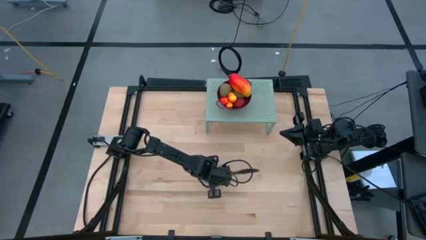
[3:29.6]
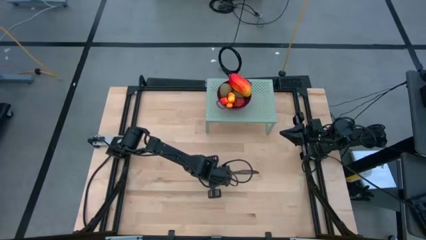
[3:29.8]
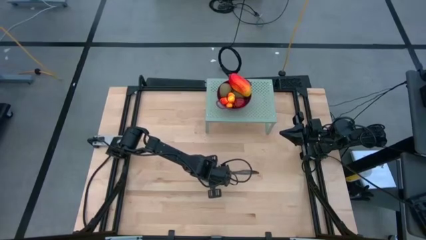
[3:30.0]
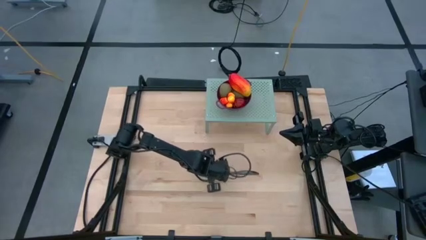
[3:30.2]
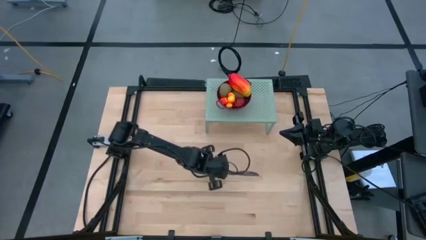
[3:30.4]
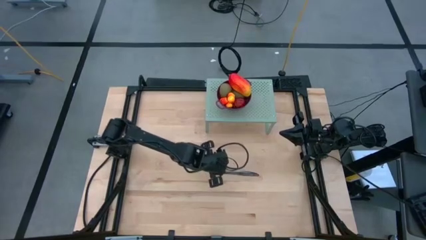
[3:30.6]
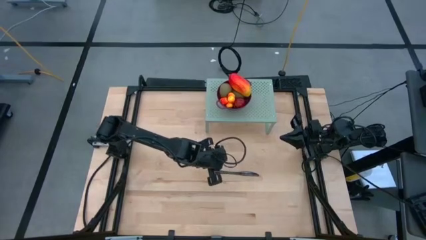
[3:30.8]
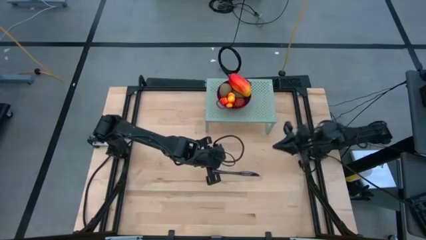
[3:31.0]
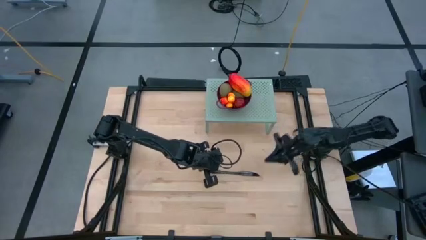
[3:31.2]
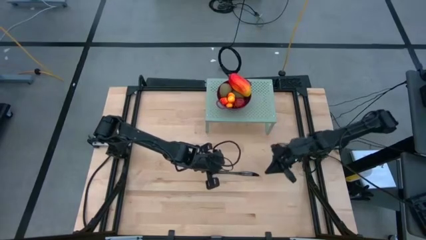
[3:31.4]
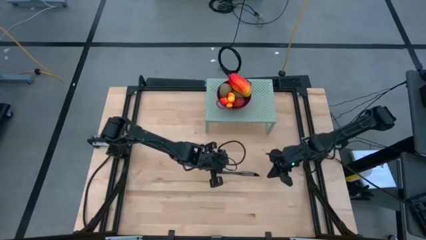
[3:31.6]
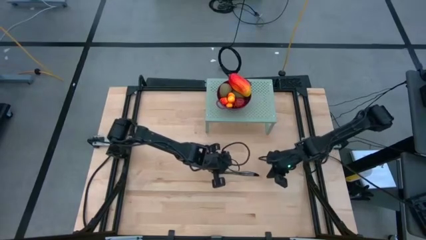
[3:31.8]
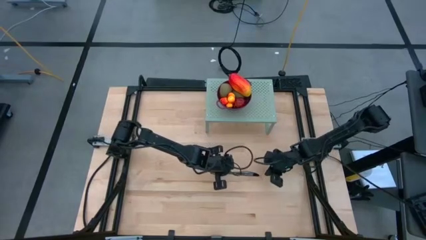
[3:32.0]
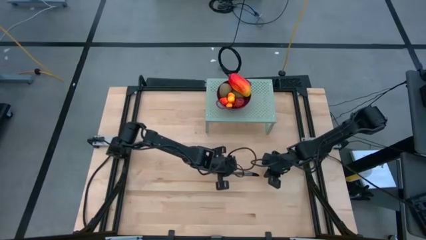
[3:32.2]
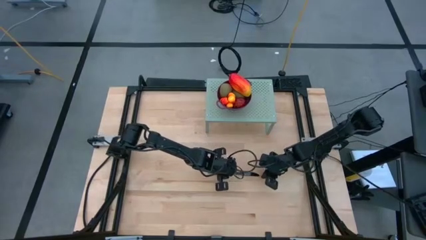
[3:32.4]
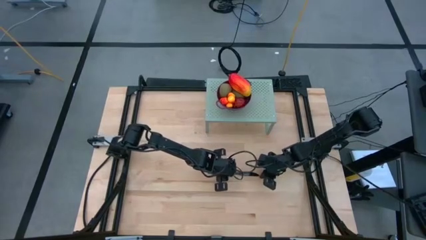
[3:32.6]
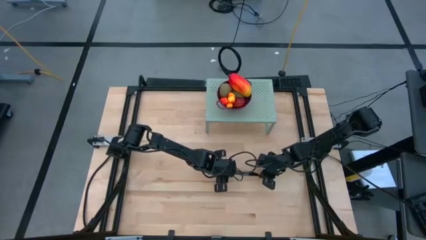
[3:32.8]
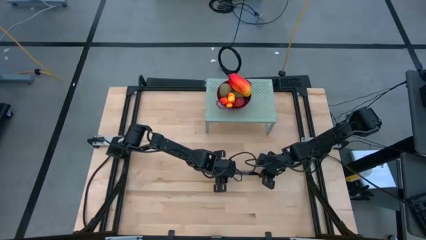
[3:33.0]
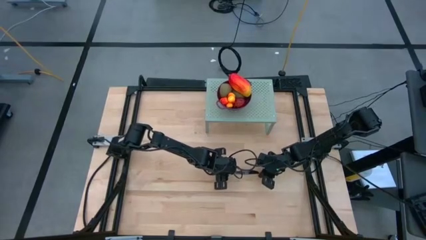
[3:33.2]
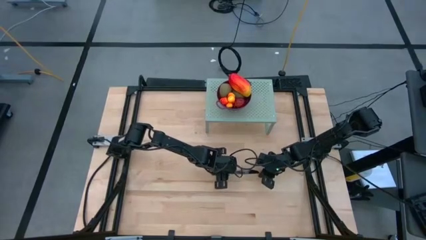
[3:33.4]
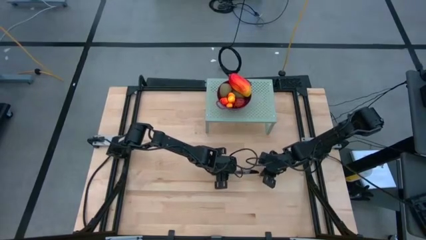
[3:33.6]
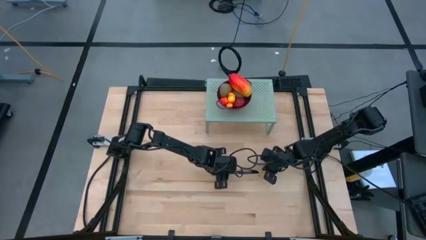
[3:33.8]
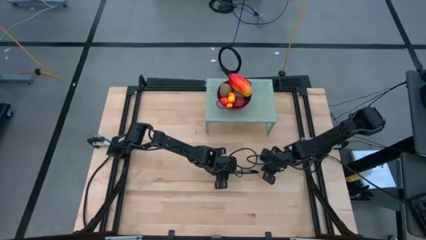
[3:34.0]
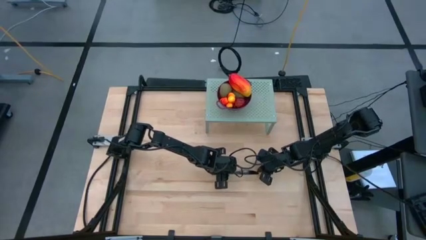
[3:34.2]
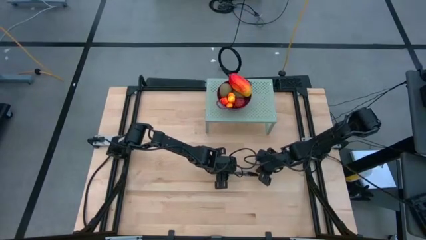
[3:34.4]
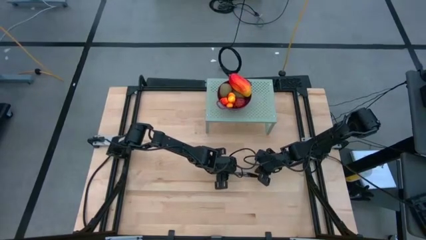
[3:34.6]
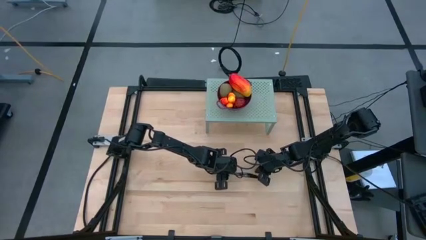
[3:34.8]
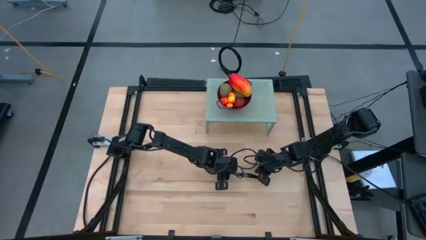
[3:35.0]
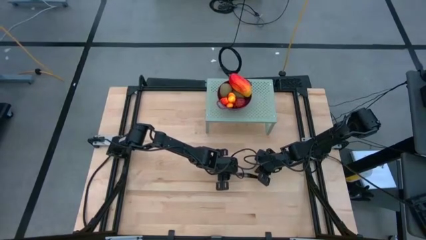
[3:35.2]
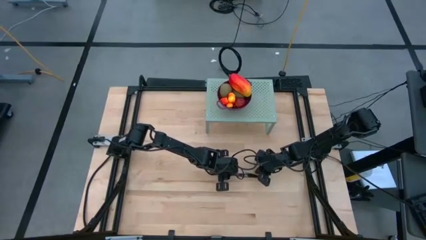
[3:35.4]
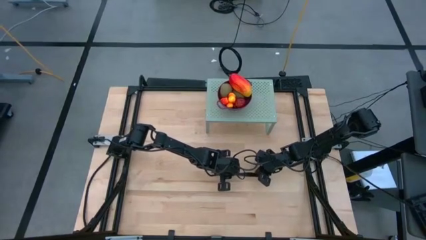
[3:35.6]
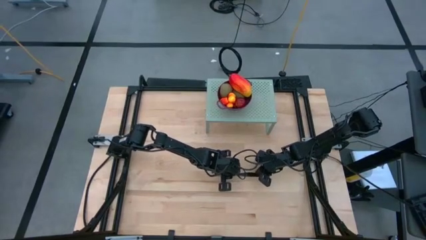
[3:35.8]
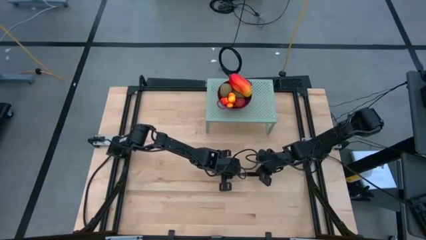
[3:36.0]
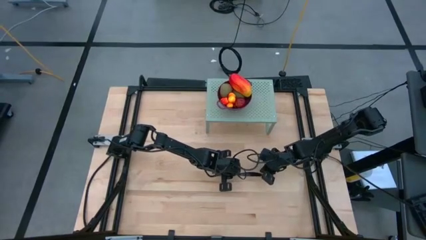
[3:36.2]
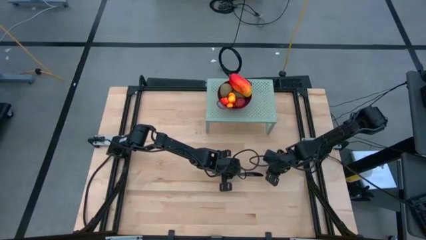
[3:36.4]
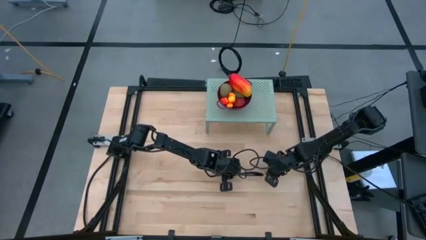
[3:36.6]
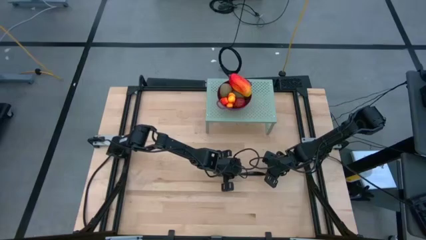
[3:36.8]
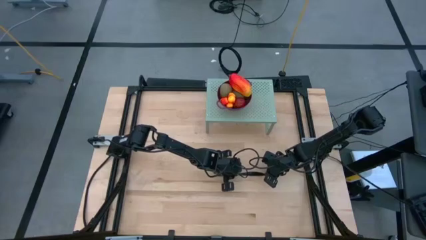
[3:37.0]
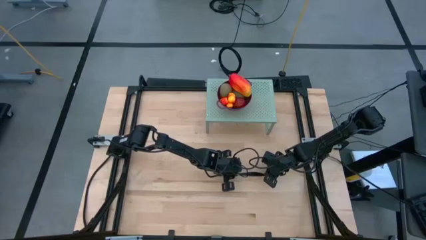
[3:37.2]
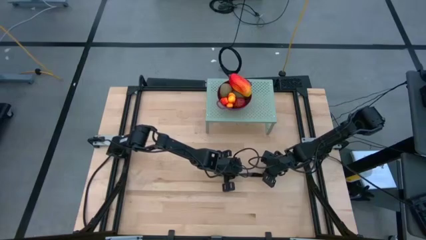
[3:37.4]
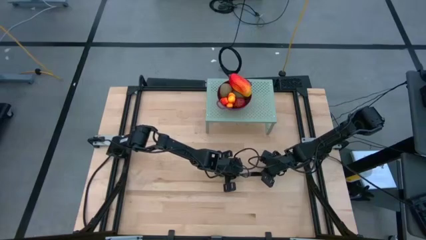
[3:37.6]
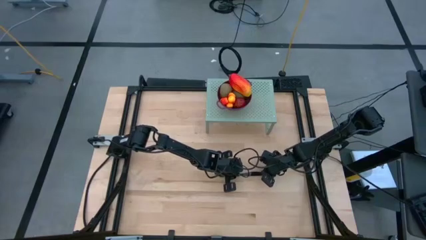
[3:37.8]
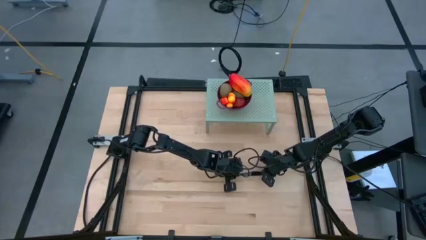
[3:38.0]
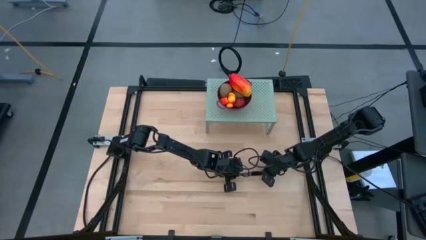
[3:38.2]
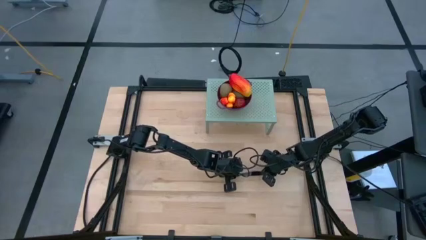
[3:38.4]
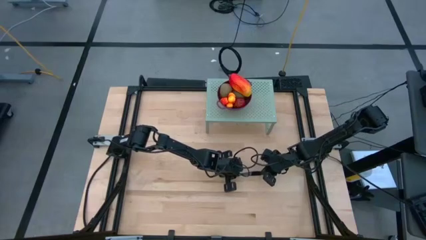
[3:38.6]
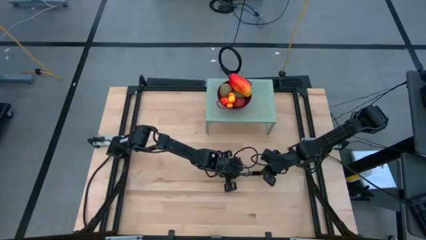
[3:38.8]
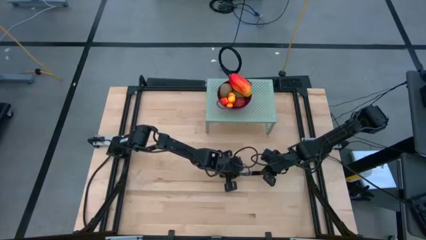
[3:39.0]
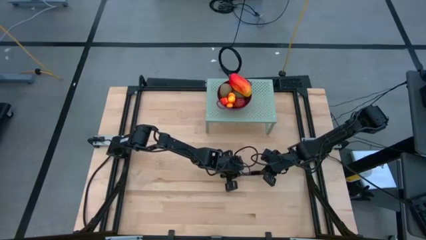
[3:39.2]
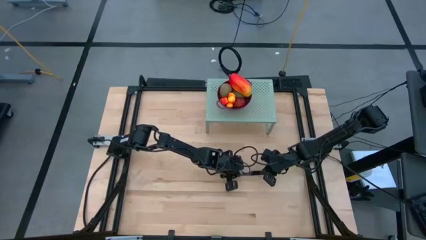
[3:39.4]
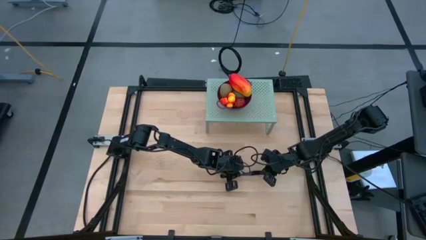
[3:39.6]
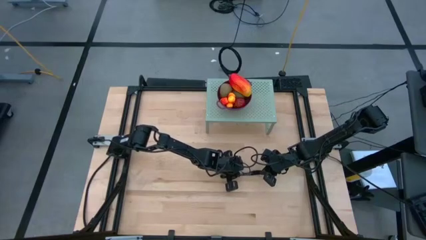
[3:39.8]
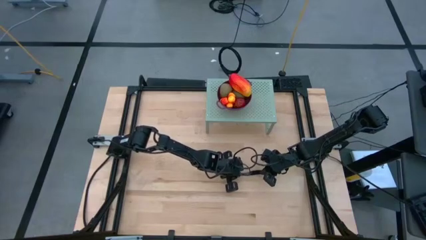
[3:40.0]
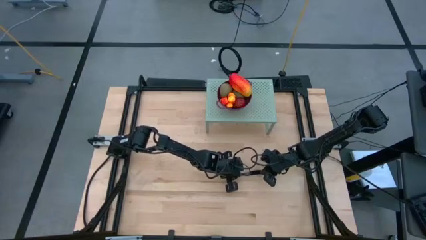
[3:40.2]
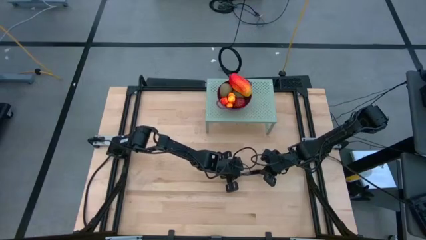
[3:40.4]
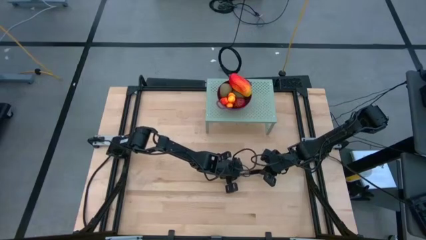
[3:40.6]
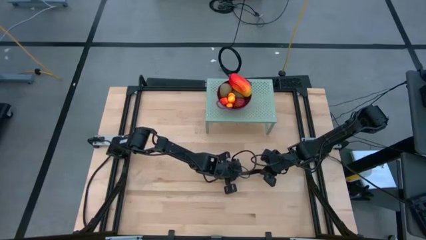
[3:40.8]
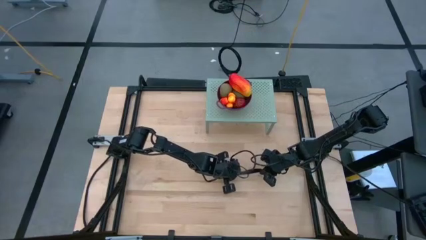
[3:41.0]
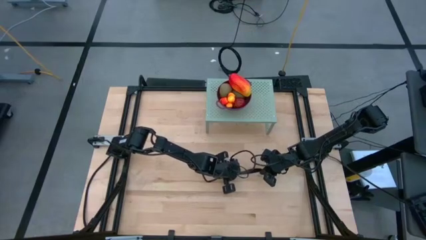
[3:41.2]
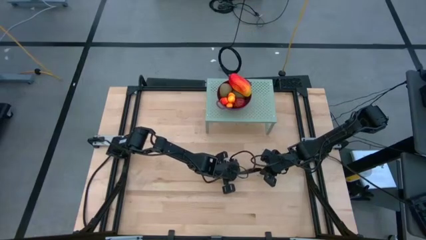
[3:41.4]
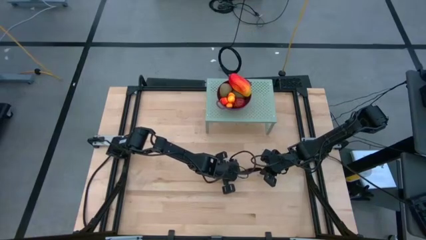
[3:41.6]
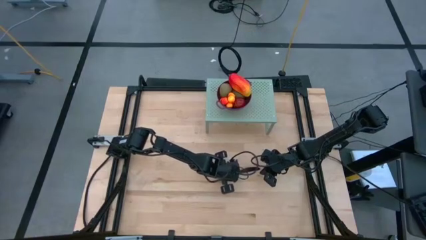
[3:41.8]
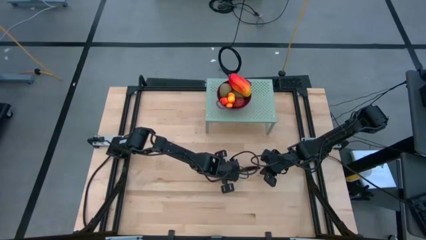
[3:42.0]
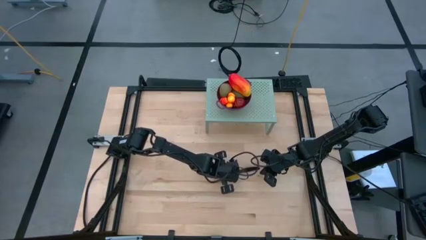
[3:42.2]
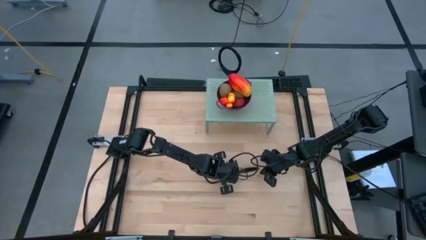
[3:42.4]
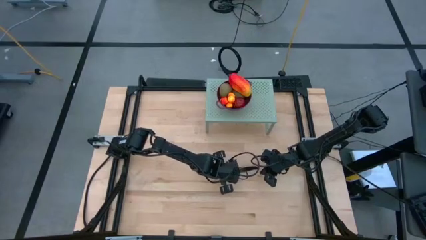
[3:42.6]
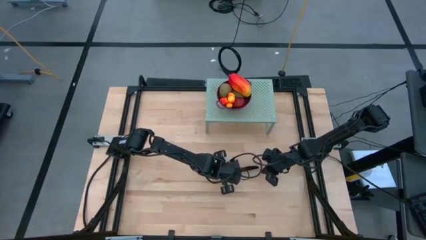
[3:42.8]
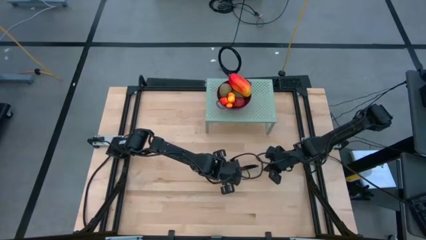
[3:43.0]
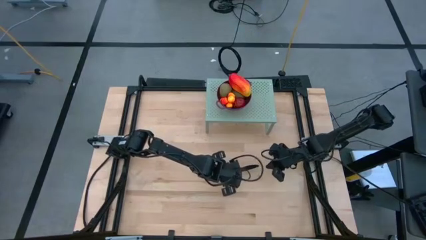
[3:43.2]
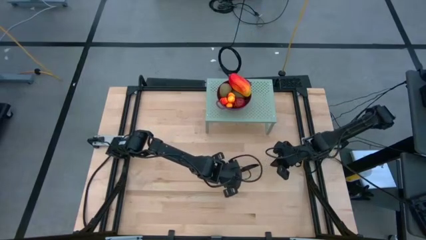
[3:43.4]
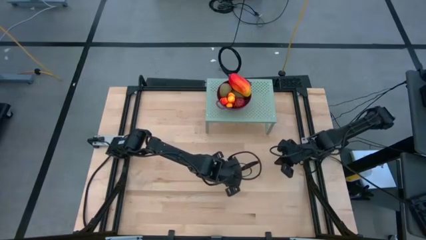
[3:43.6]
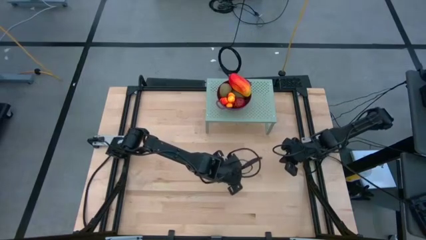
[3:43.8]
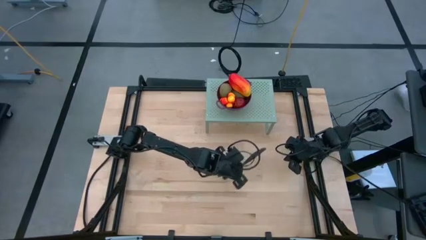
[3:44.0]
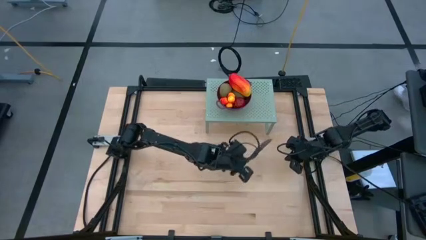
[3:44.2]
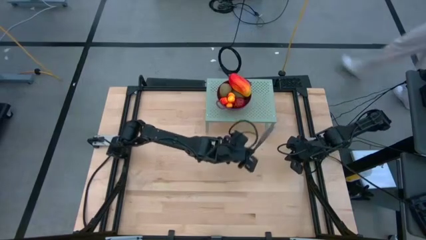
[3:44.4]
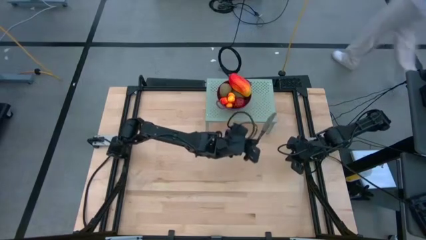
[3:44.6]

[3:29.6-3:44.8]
Task: Pick & Place Fruit
Put the knife on the shelf

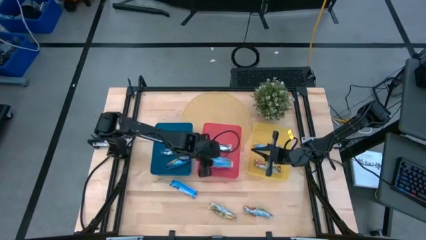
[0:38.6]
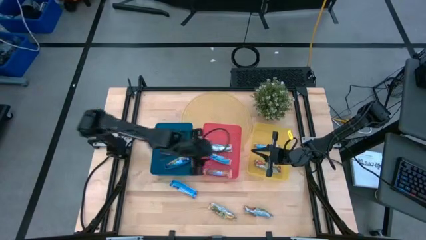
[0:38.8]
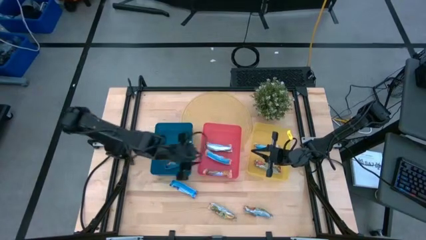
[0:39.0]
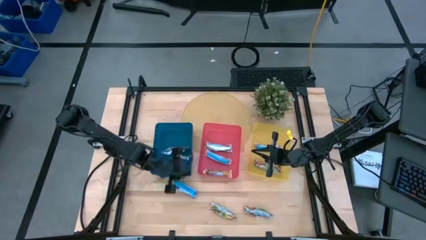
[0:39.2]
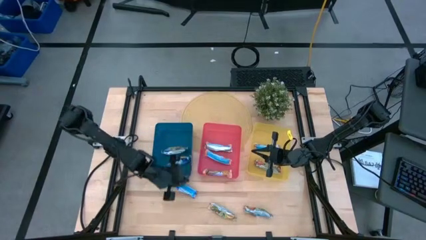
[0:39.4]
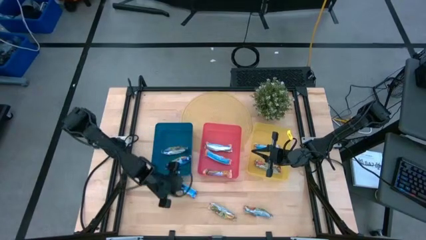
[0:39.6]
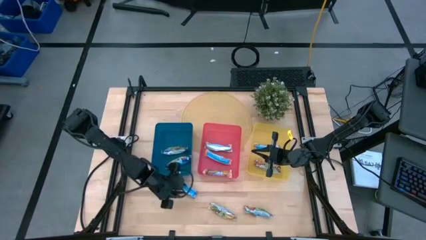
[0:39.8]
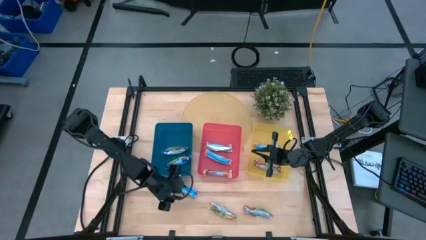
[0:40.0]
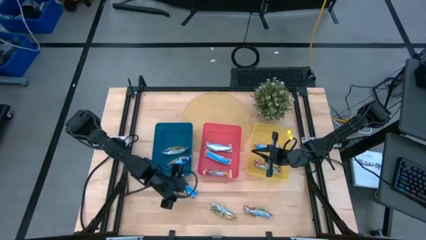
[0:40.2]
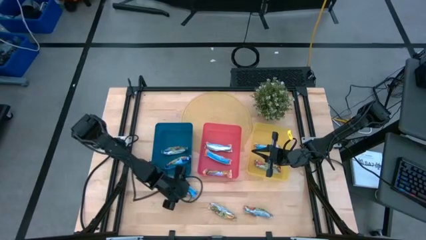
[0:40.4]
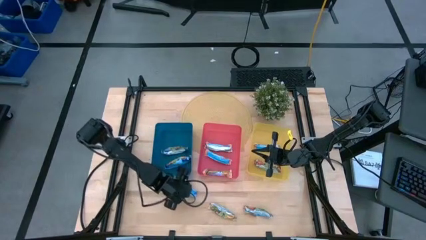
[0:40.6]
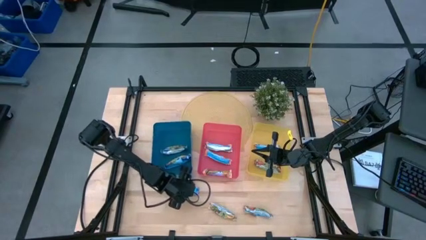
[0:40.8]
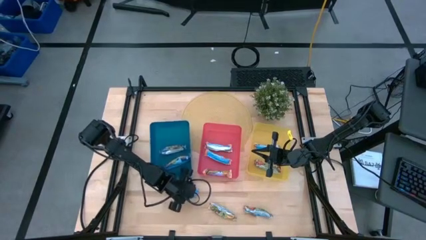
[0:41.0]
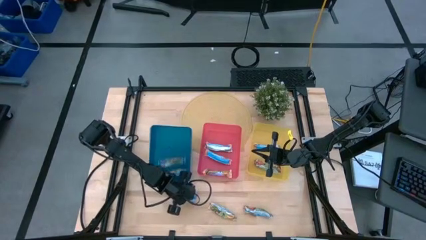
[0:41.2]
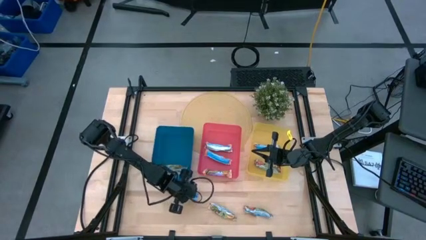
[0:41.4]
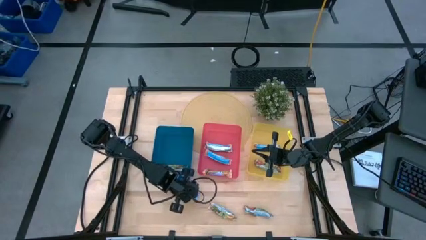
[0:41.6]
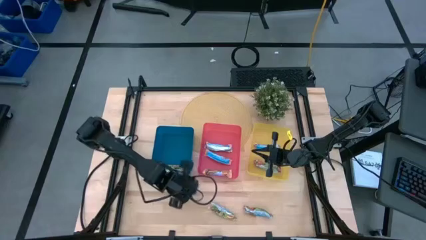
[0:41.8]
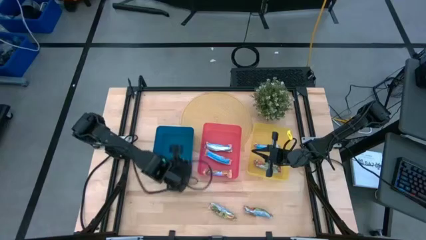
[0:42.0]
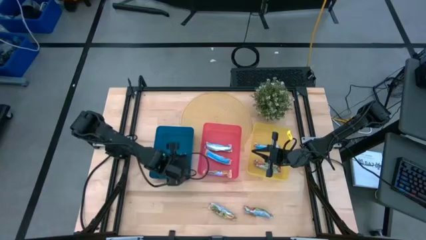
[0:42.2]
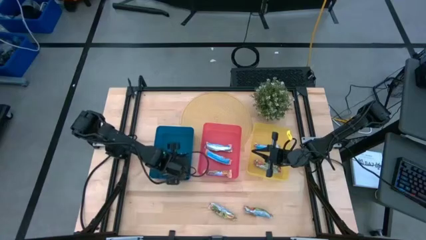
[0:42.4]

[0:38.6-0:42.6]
Task: Pick and place Granola Bars by type
Put the blue granola bar into the blue bin
